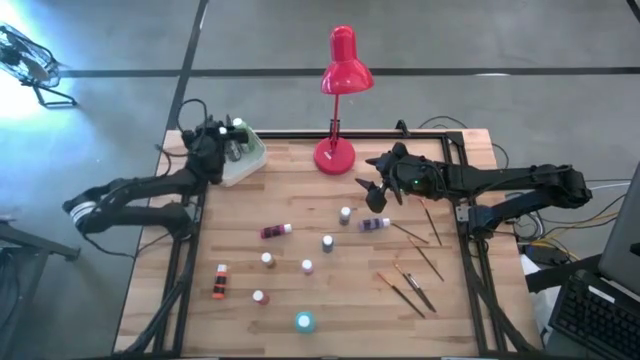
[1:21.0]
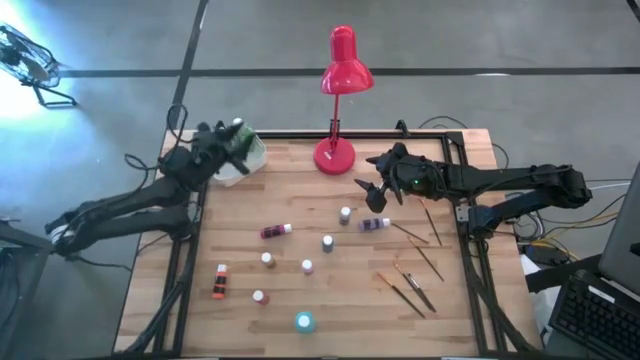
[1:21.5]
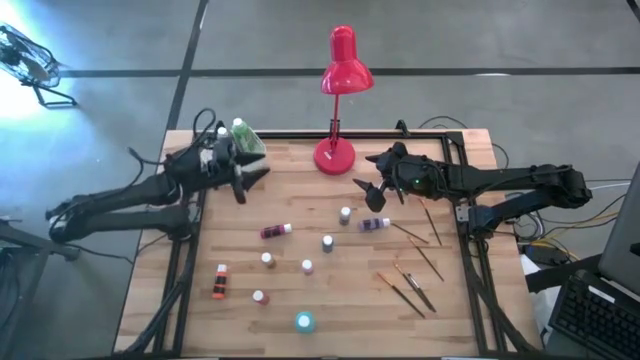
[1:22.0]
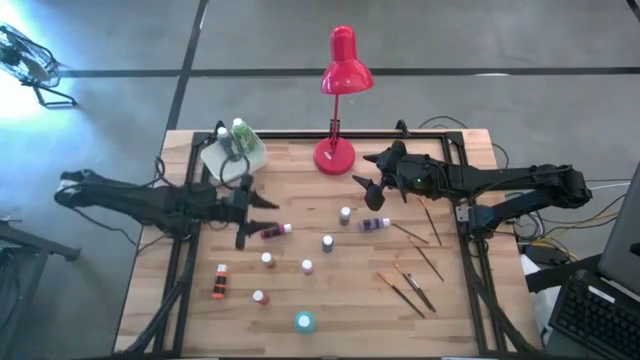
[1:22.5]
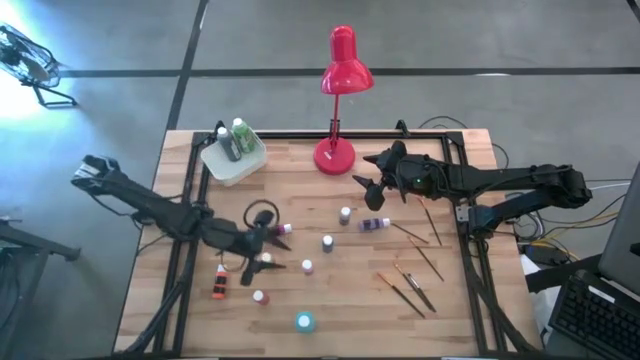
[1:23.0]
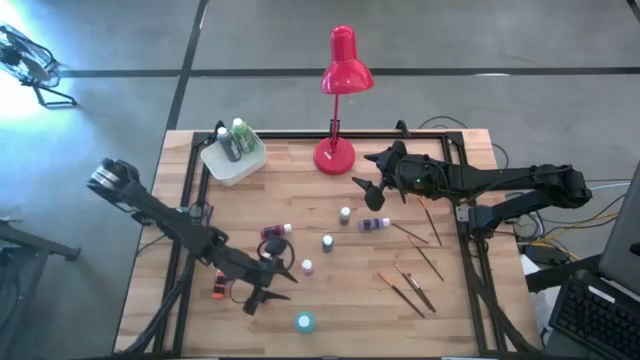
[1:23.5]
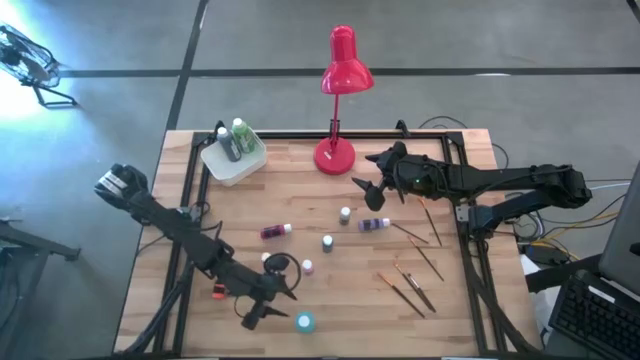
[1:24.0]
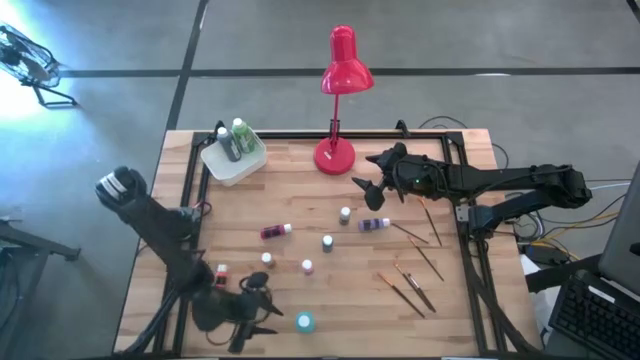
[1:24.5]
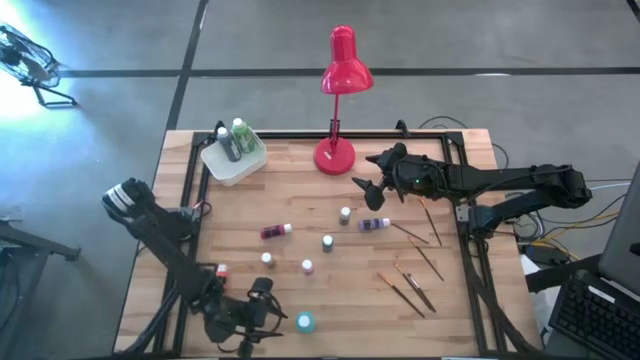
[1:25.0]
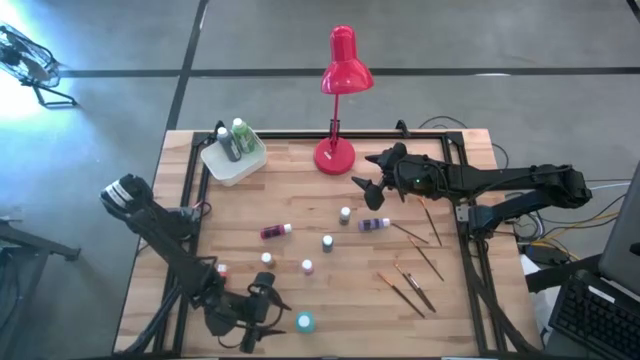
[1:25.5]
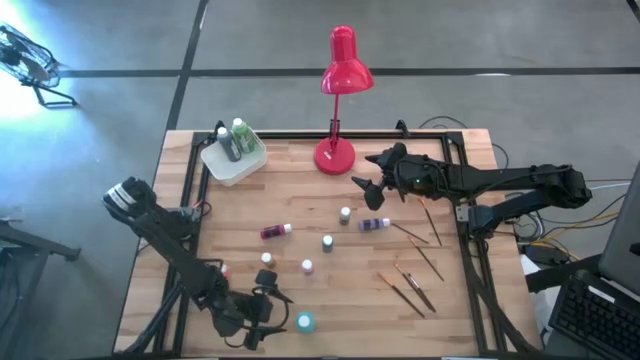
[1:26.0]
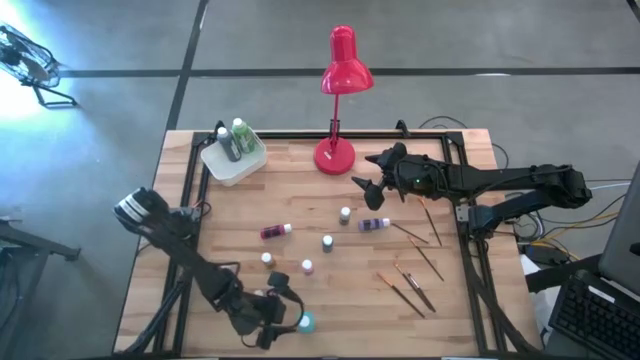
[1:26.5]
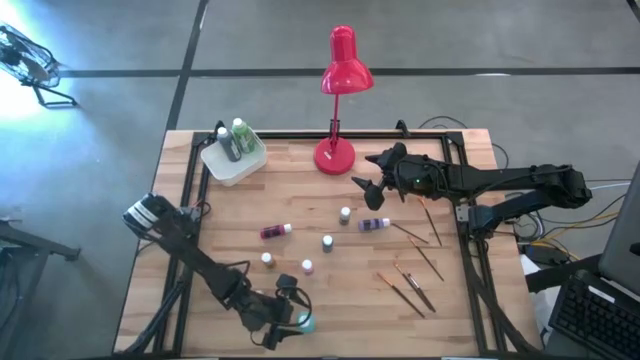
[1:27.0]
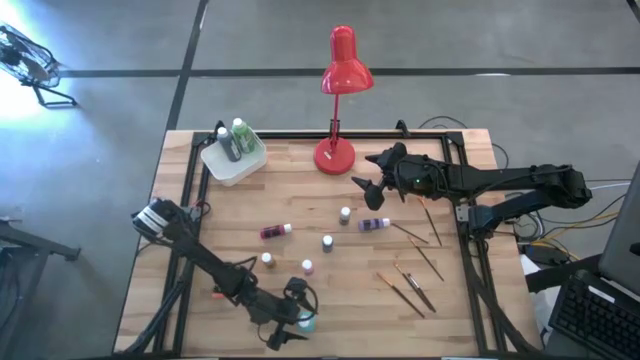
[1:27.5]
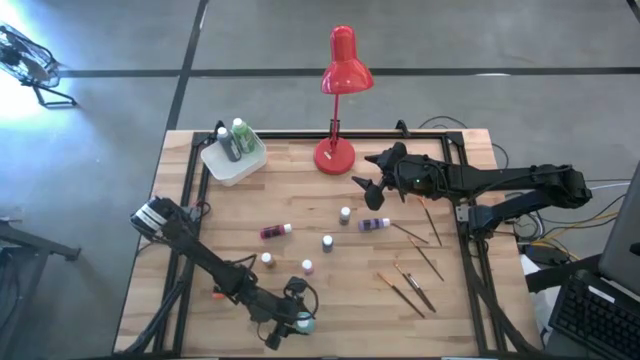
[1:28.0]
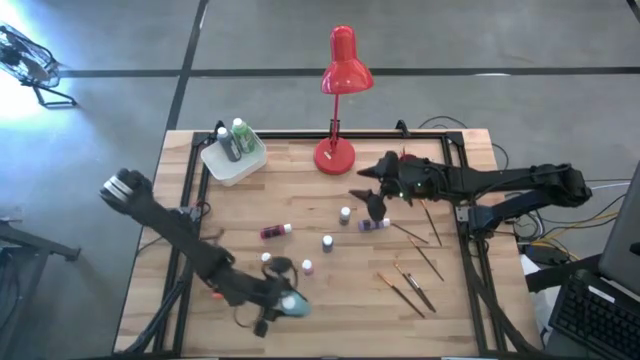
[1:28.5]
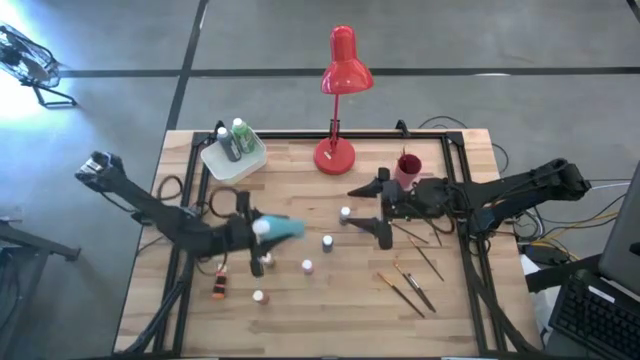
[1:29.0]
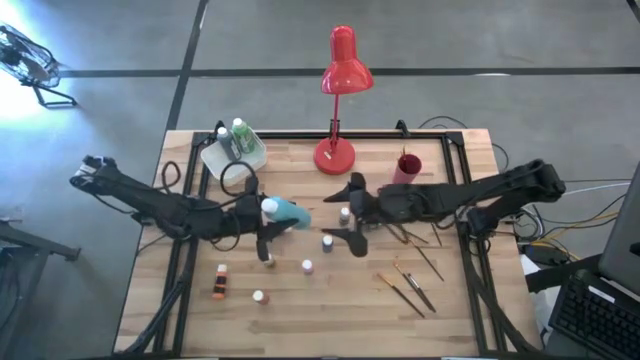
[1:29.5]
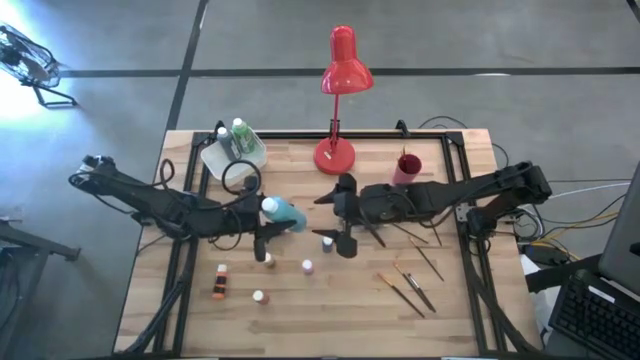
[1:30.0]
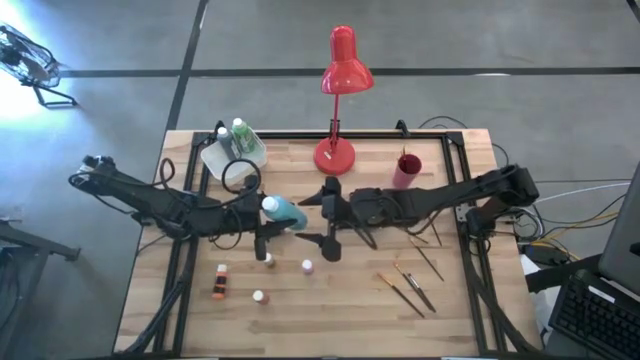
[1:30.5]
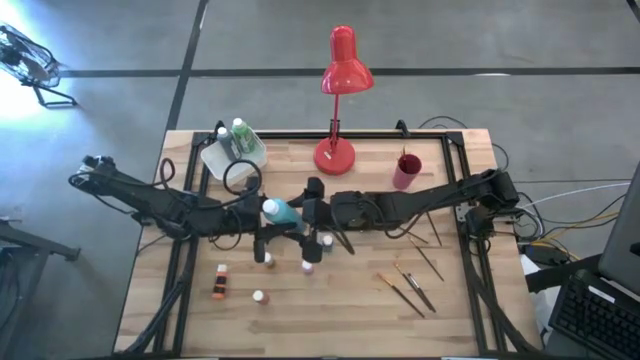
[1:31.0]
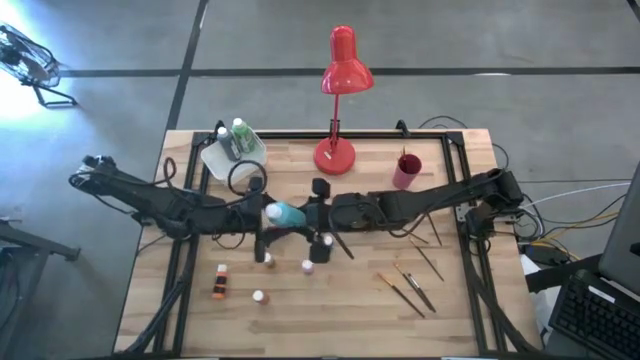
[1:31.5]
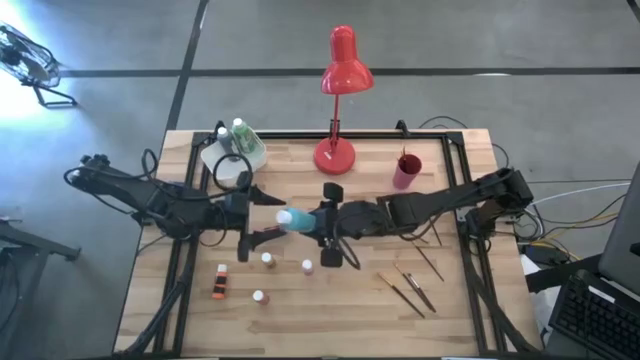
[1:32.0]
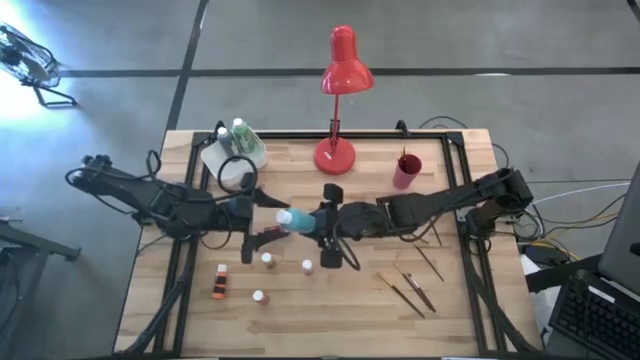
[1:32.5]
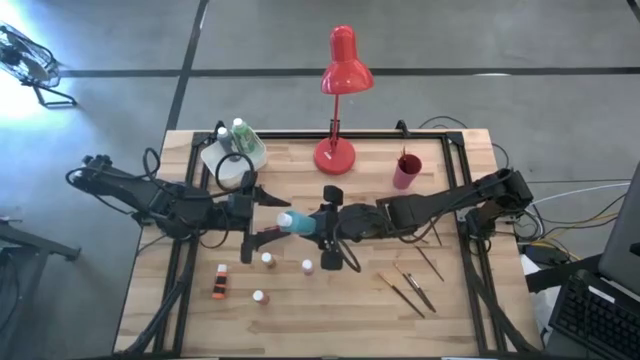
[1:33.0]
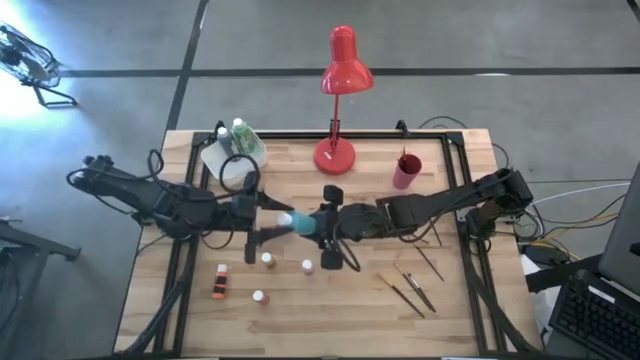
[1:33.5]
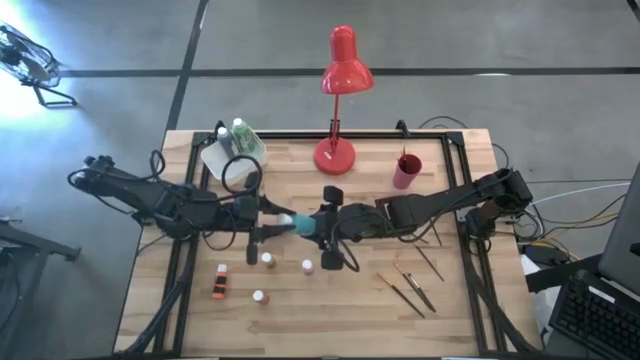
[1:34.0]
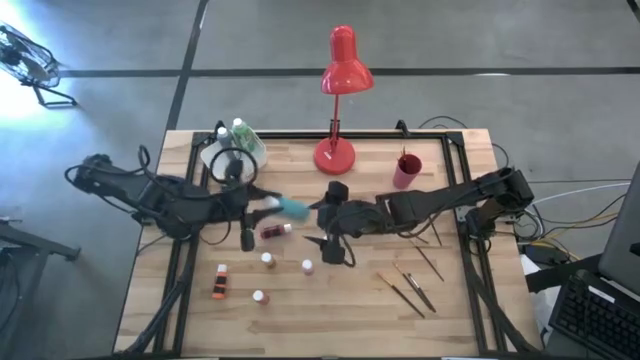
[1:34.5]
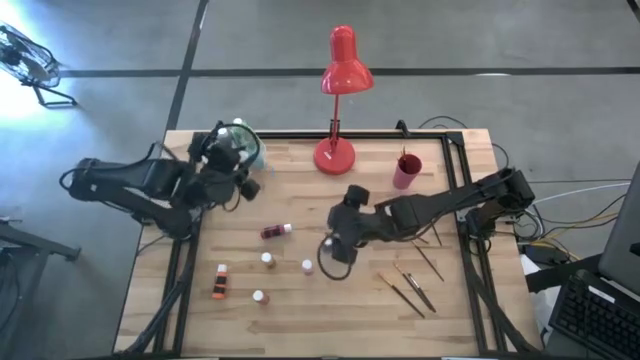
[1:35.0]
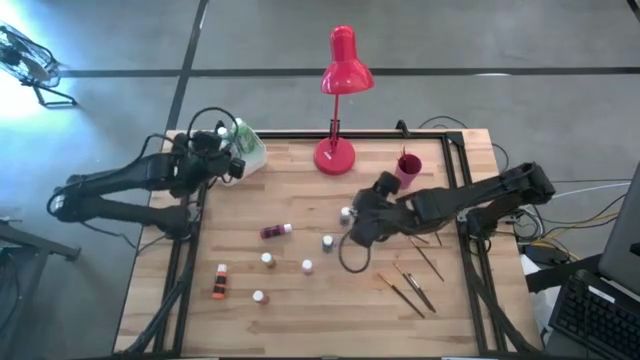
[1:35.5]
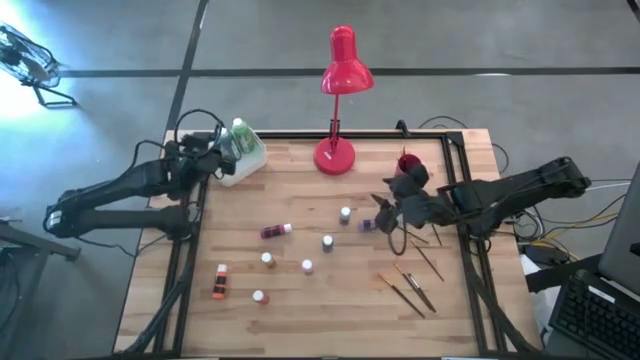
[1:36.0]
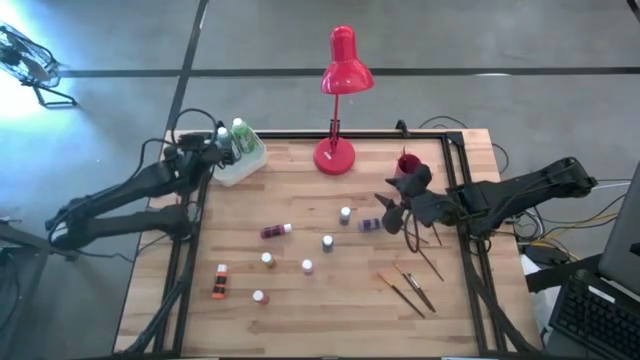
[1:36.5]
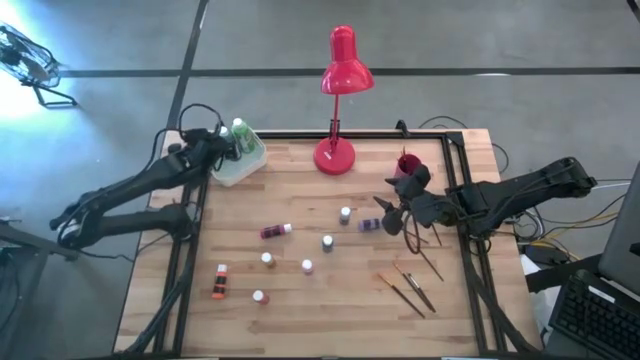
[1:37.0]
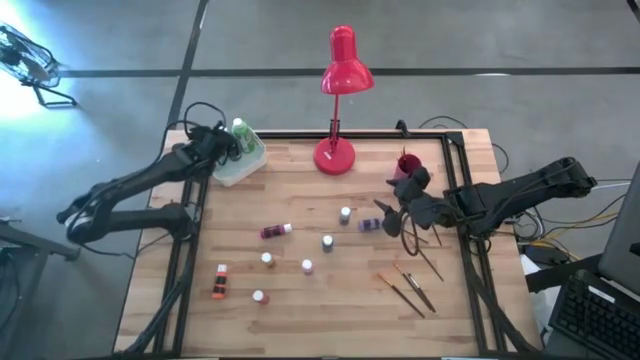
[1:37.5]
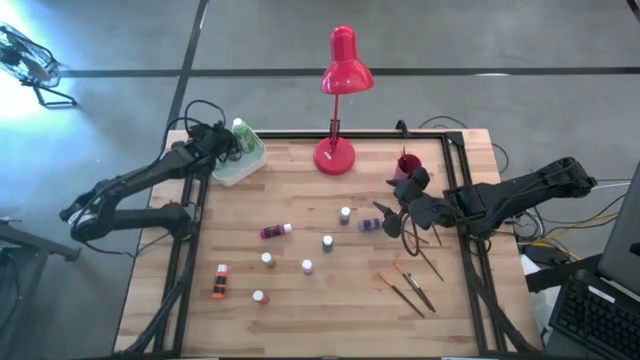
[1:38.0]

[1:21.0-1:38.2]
Task: Pick & Place Paint Supplies
Put the light blue paint bottle into the white bin
